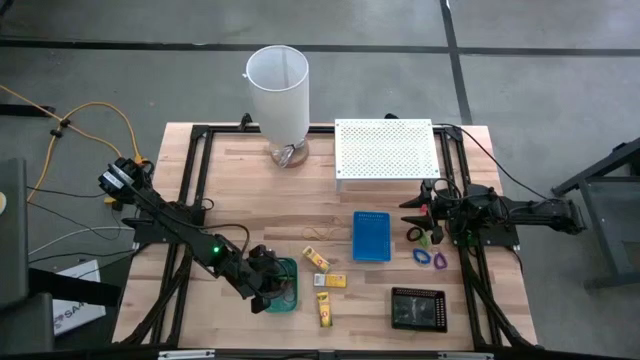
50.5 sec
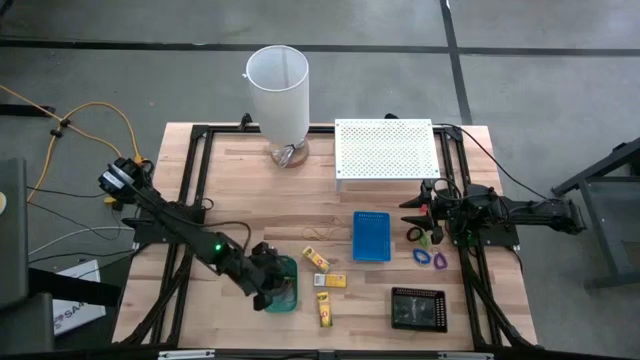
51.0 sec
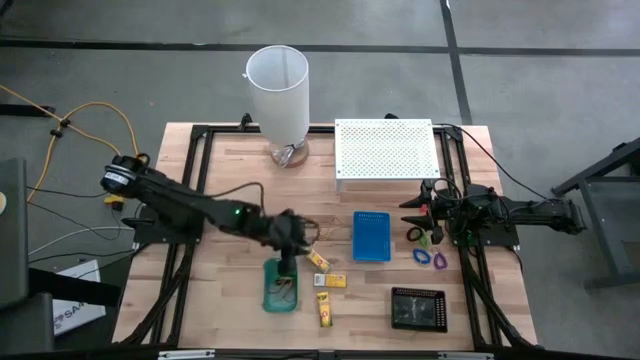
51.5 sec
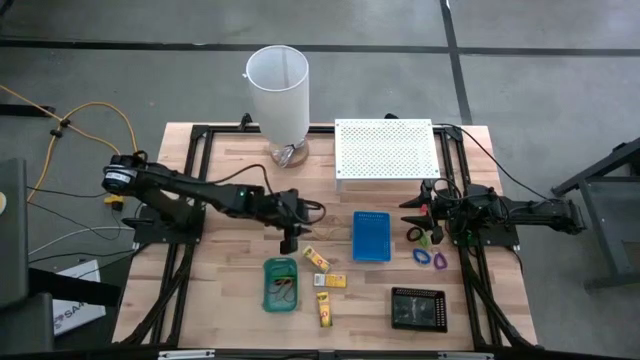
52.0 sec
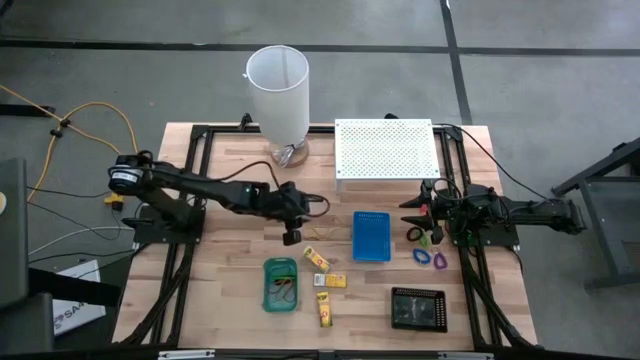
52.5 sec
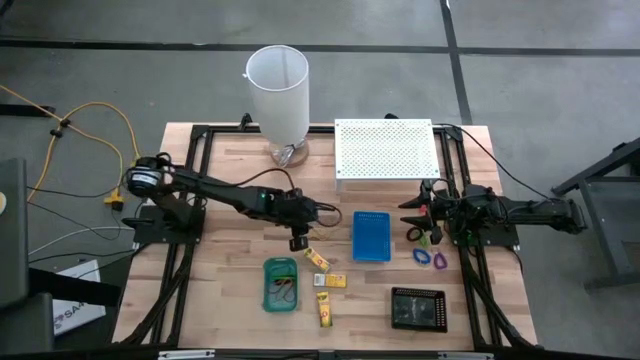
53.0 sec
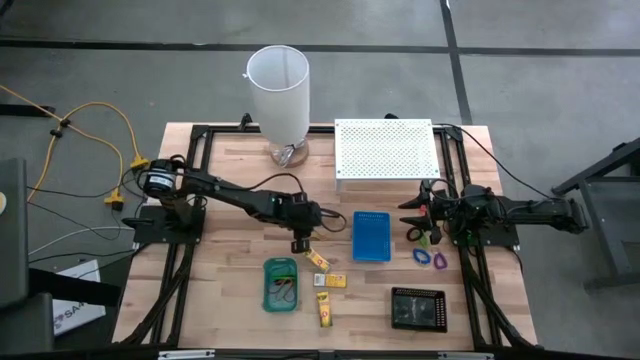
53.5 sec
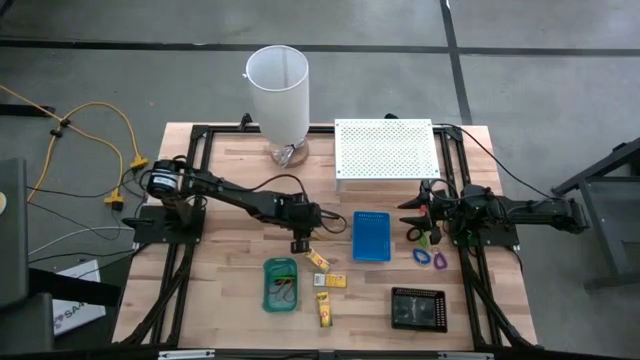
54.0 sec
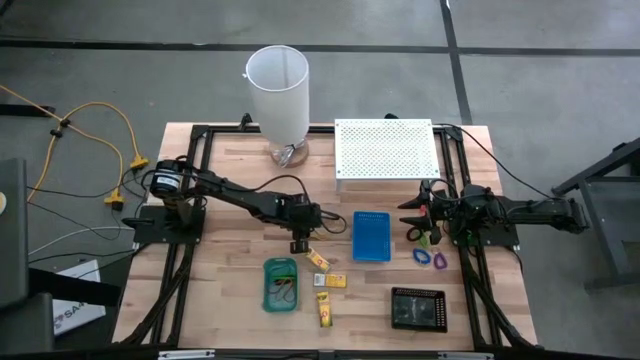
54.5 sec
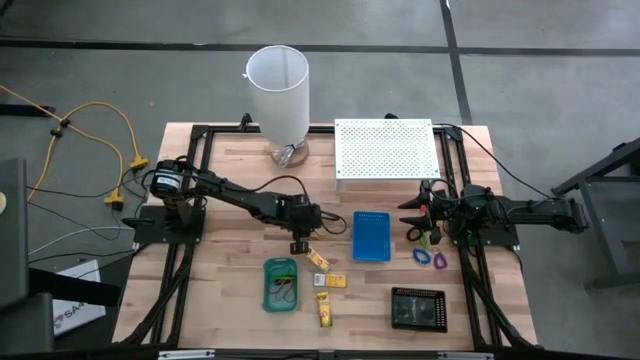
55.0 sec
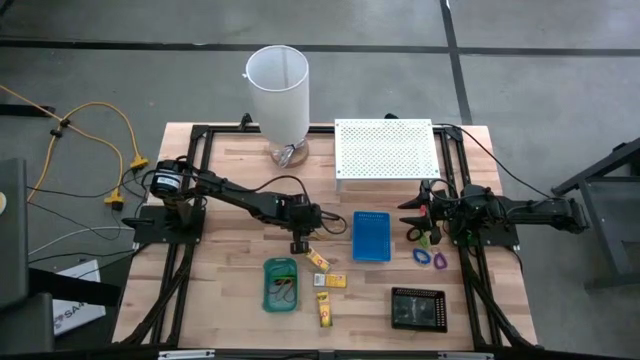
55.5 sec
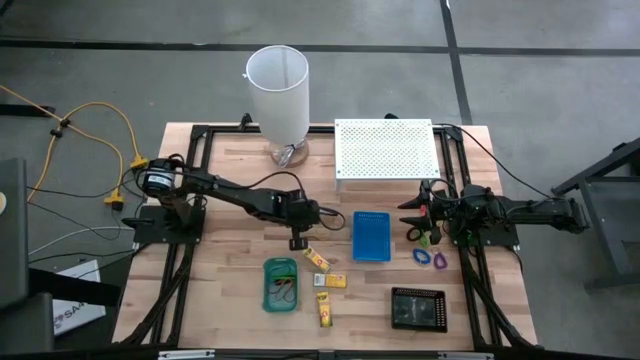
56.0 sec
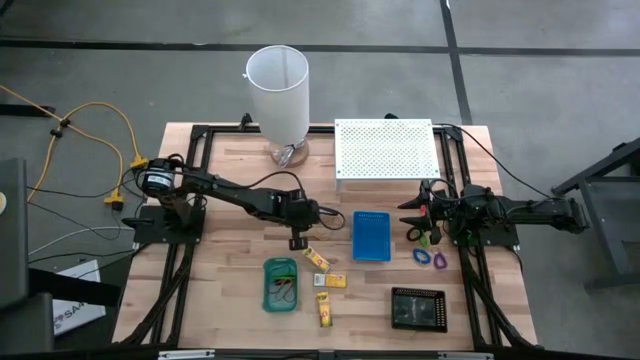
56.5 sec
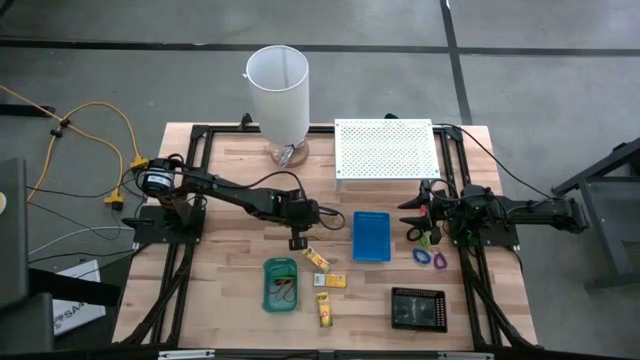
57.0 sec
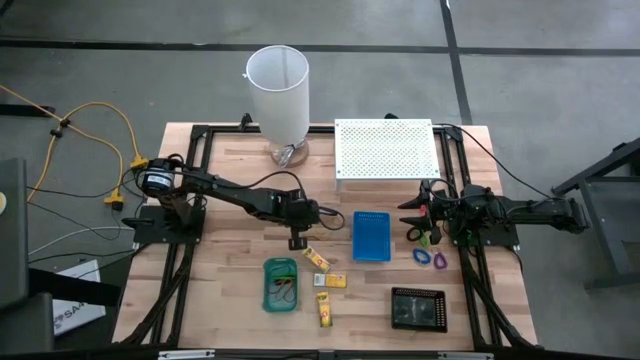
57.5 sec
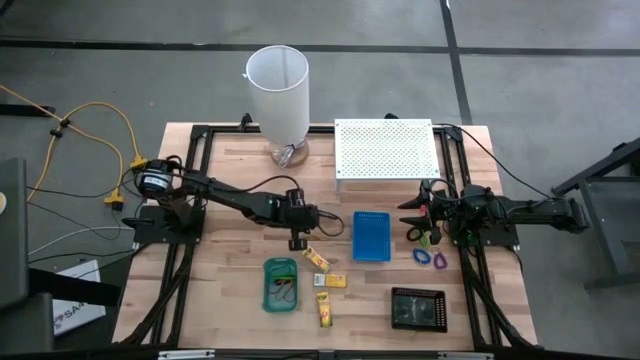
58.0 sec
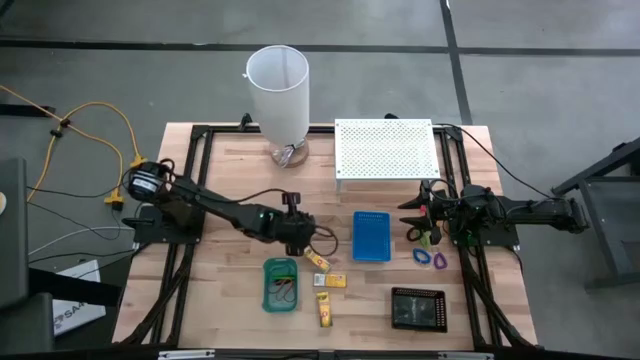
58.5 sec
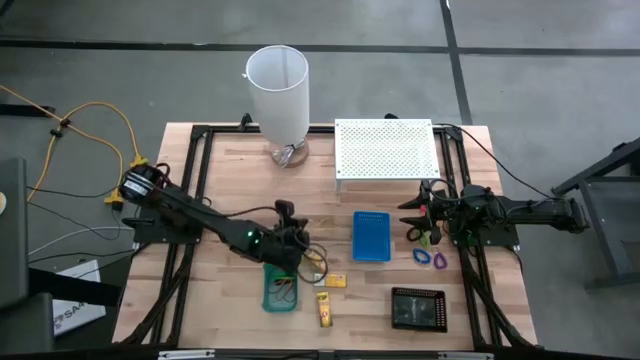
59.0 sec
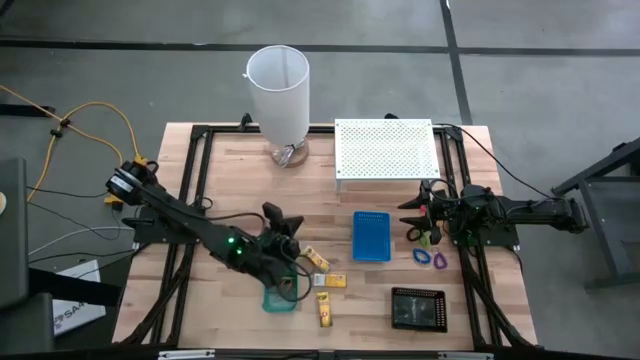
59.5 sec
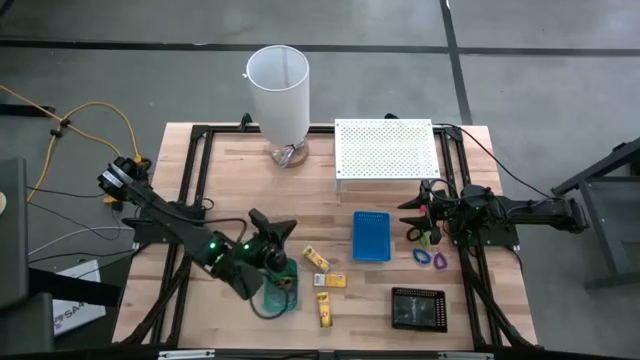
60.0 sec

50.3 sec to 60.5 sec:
Task: Pick & Place Office Desk Supplies
Put the yellow rubber band into the green bin

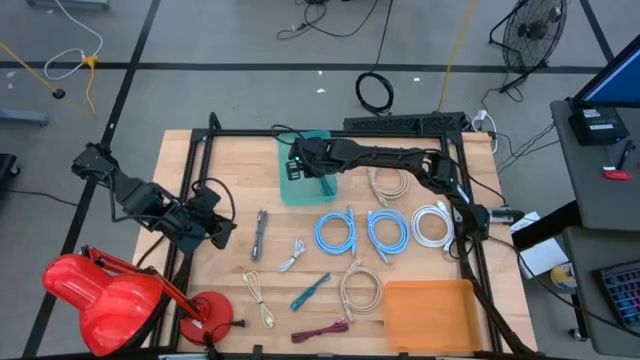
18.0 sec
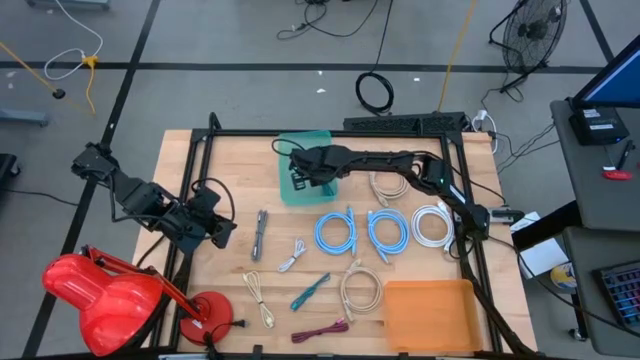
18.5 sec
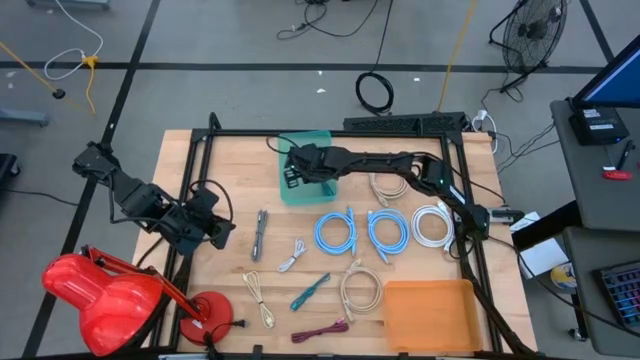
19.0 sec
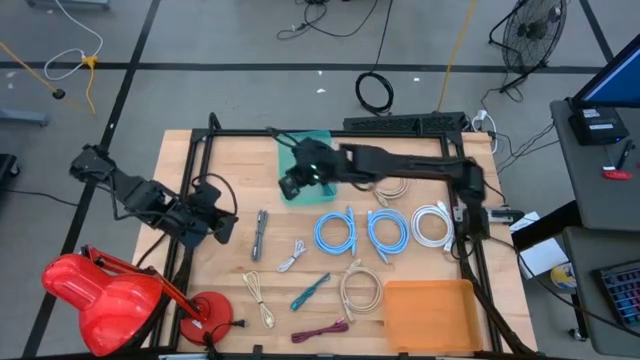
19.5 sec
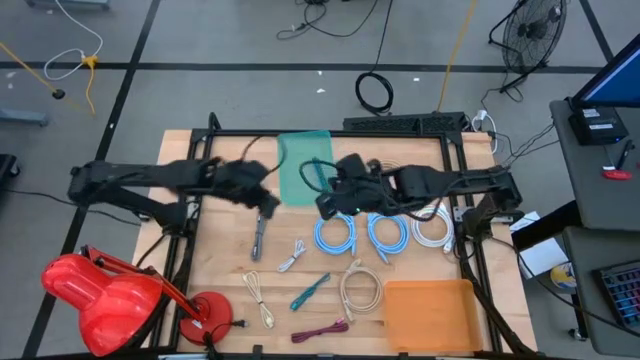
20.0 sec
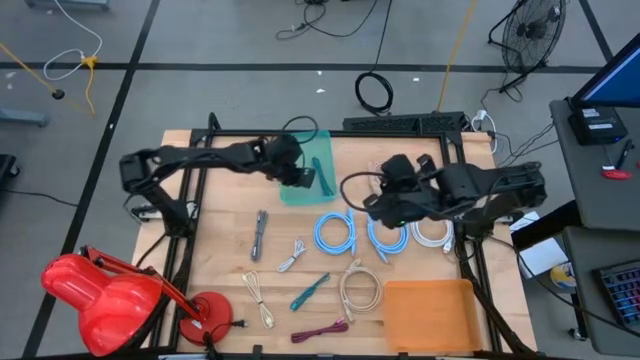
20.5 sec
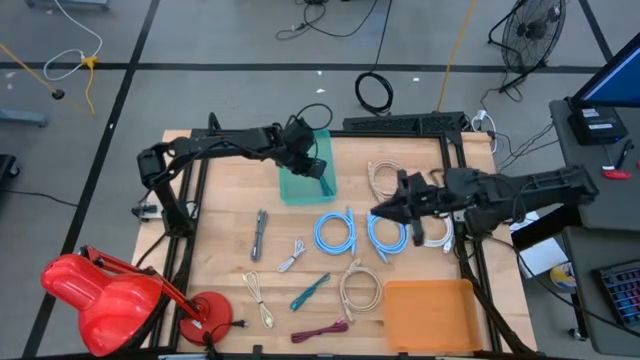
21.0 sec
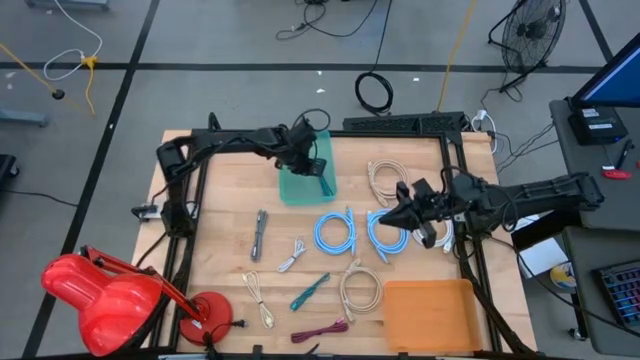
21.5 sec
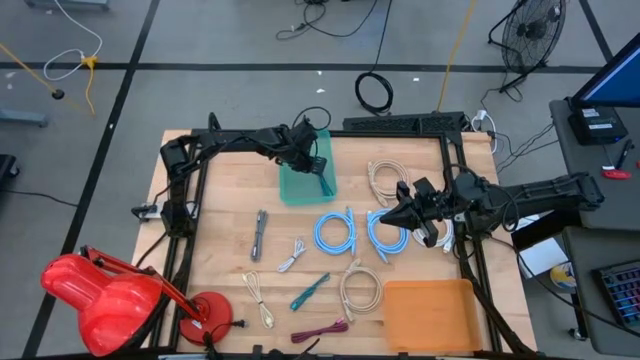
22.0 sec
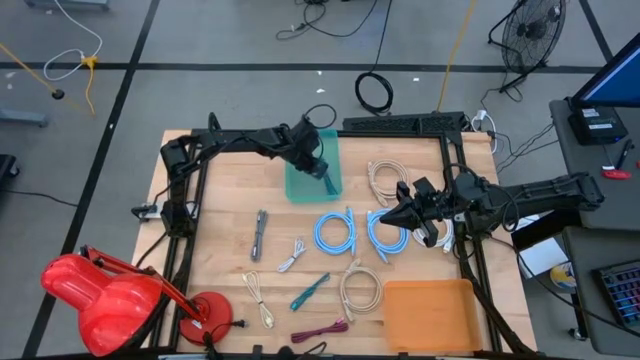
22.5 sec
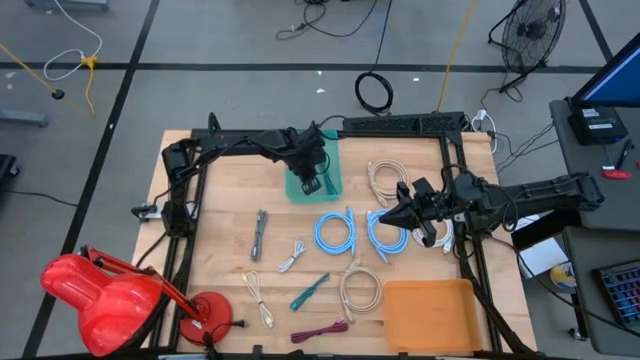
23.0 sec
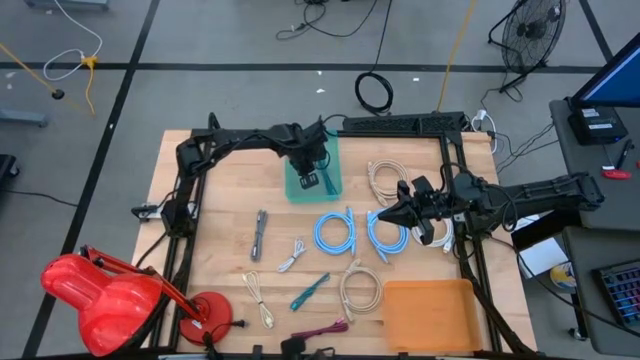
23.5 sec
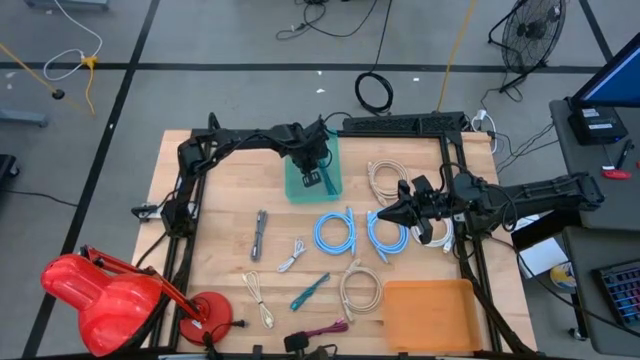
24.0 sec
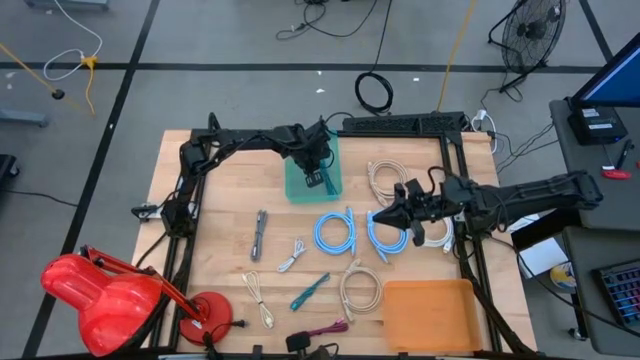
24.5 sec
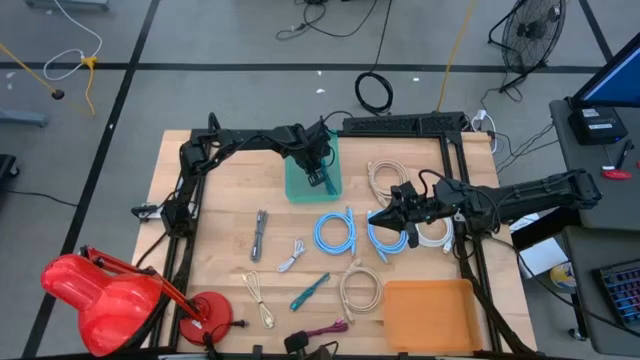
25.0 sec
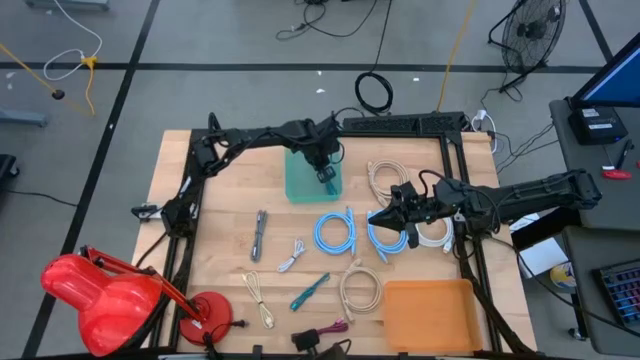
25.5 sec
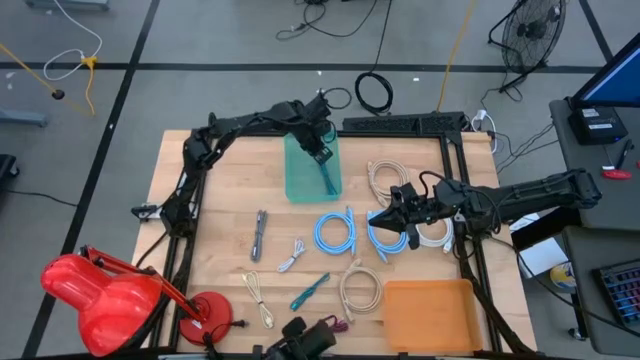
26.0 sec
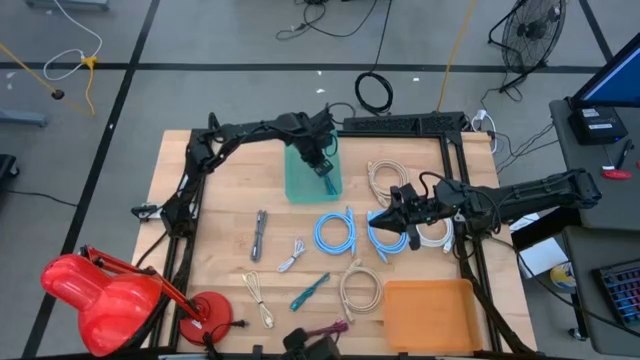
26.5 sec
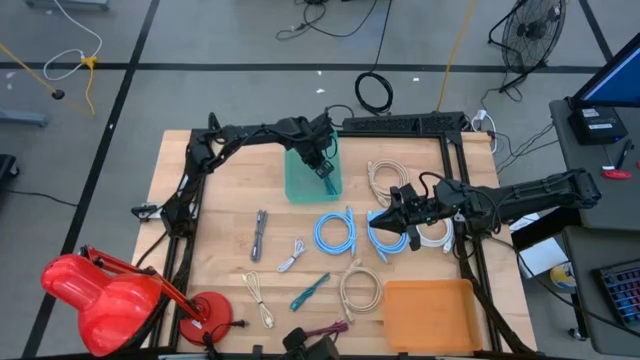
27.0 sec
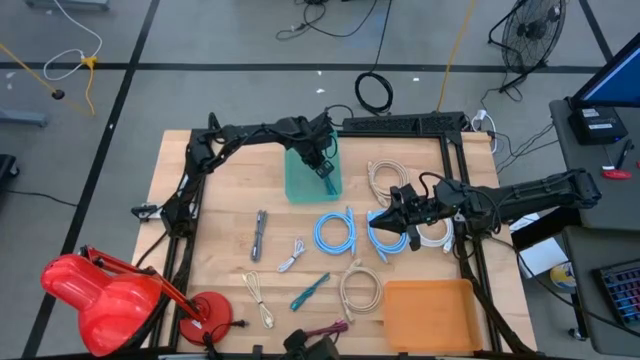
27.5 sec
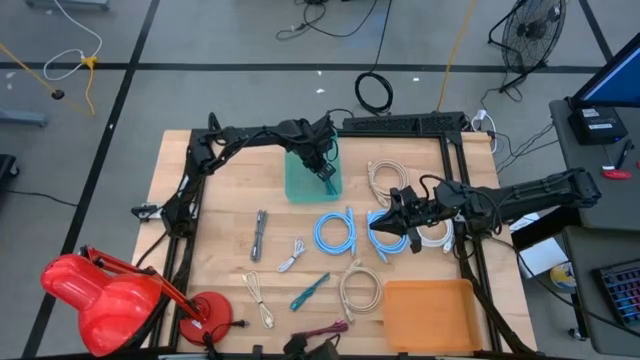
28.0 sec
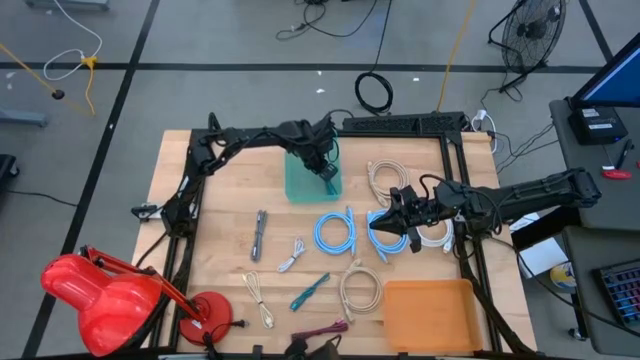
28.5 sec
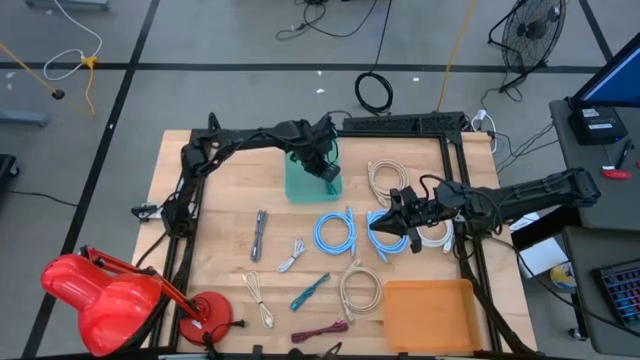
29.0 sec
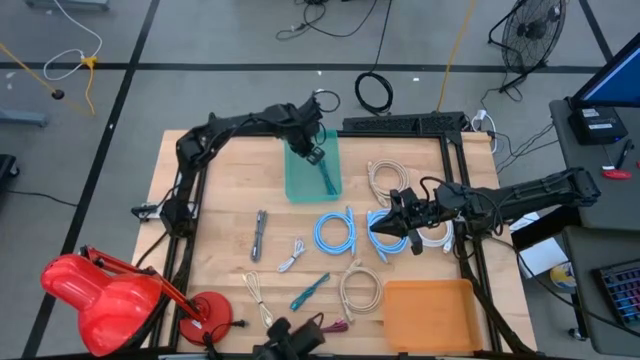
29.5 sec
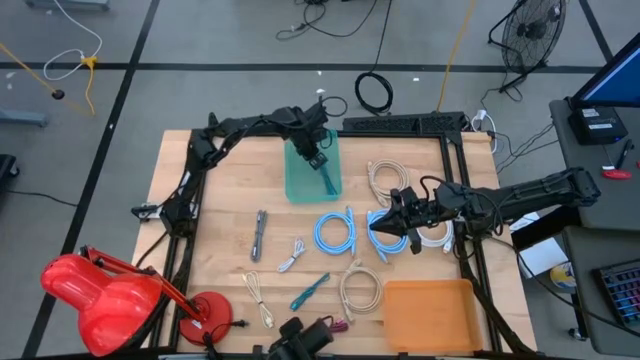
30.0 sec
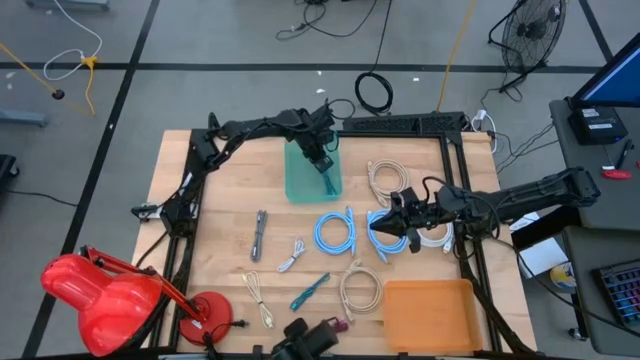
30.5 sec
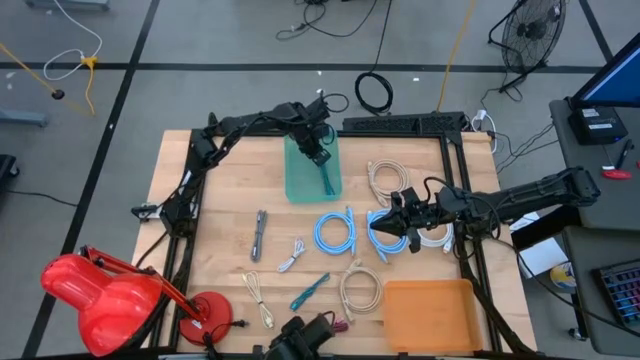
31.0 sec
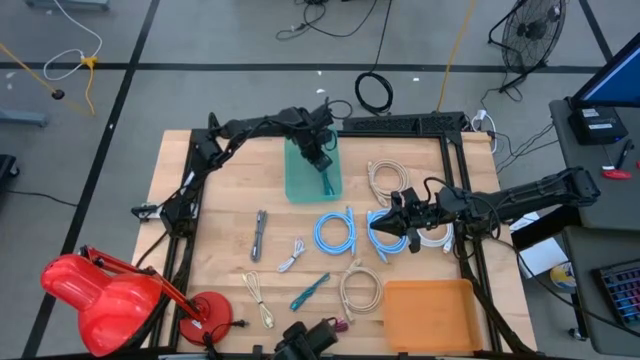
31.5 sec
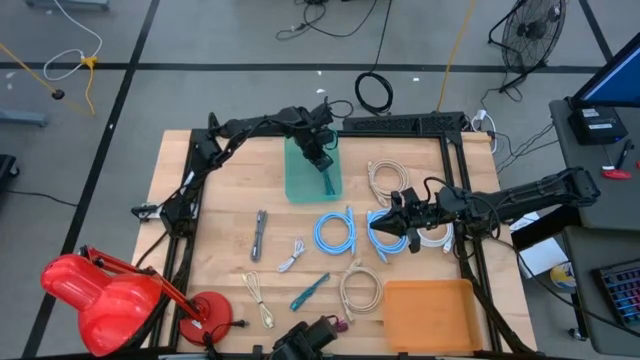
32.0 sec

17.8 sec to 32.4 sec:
Task: Pick & Place USB Port
Put the top blue charger cable into the blue bin
